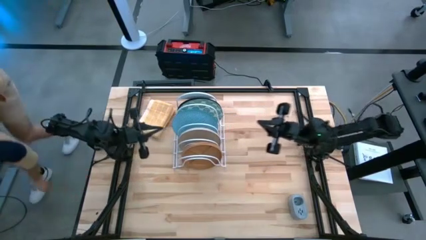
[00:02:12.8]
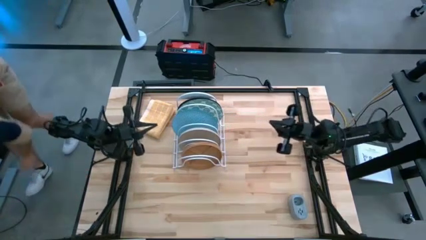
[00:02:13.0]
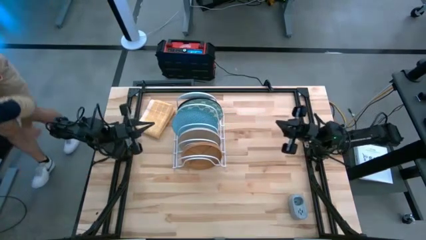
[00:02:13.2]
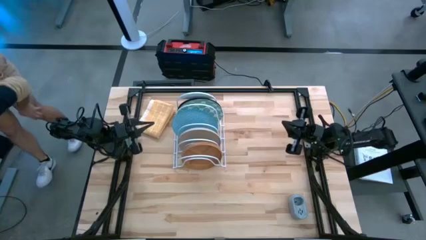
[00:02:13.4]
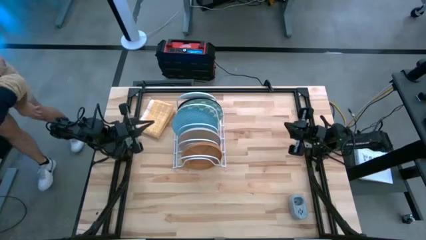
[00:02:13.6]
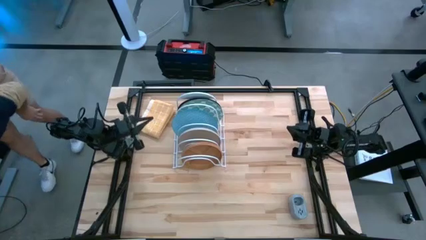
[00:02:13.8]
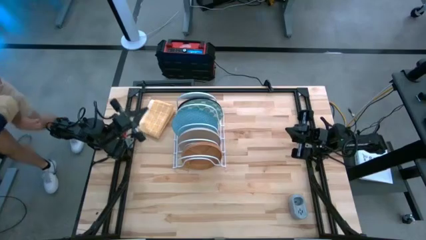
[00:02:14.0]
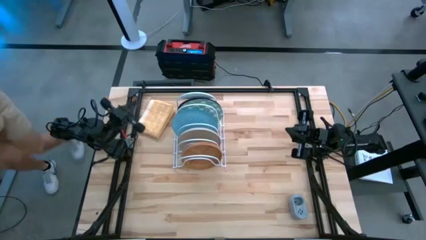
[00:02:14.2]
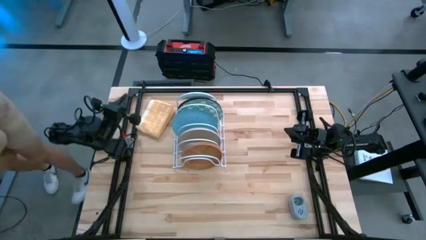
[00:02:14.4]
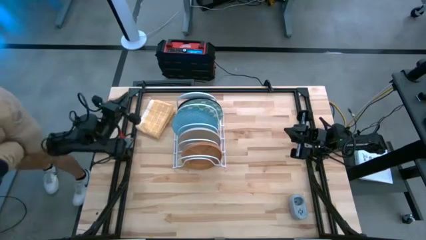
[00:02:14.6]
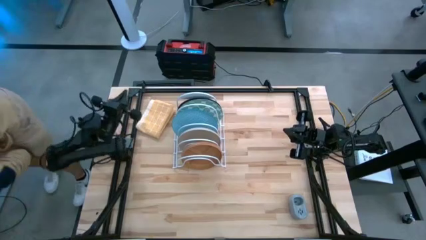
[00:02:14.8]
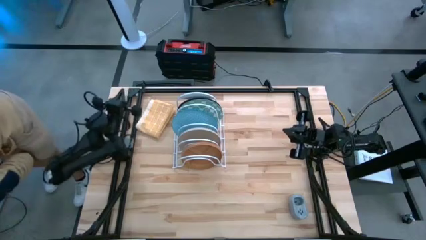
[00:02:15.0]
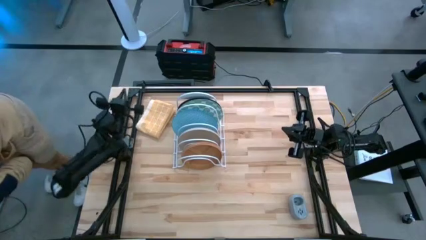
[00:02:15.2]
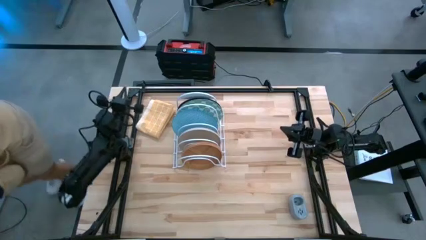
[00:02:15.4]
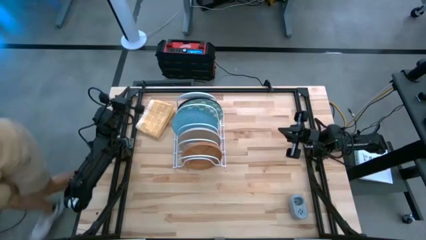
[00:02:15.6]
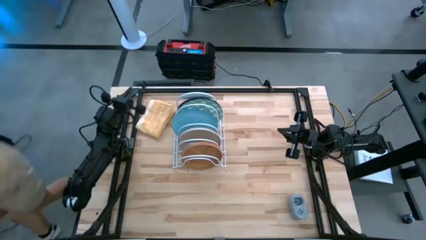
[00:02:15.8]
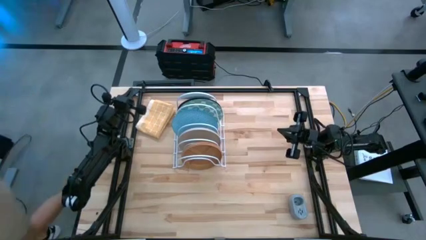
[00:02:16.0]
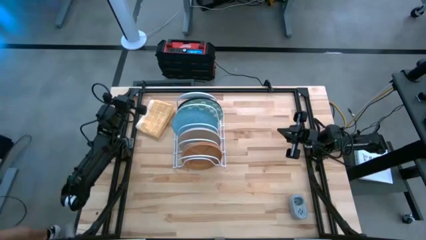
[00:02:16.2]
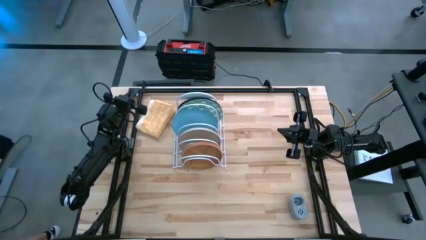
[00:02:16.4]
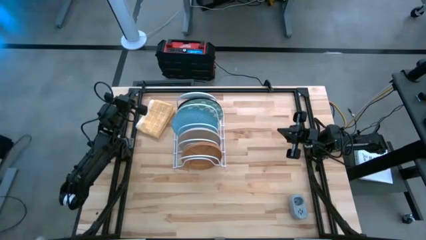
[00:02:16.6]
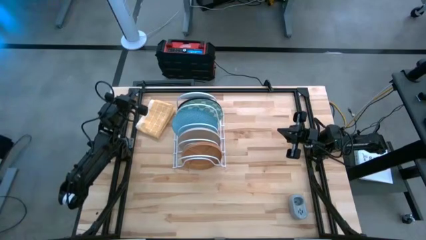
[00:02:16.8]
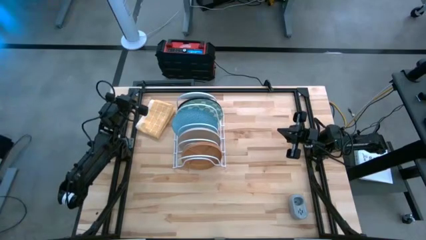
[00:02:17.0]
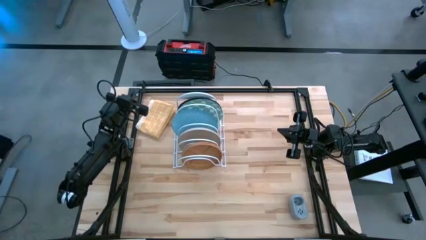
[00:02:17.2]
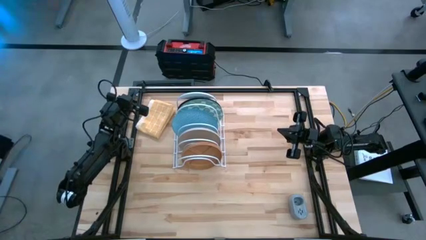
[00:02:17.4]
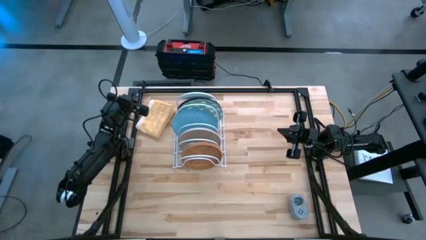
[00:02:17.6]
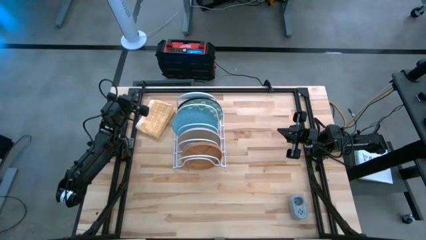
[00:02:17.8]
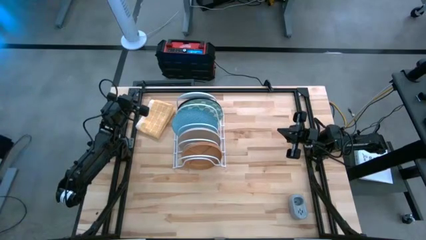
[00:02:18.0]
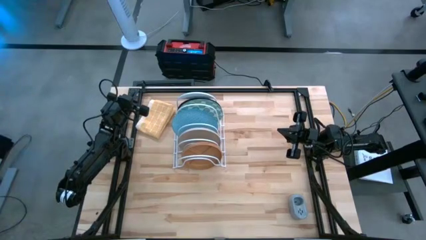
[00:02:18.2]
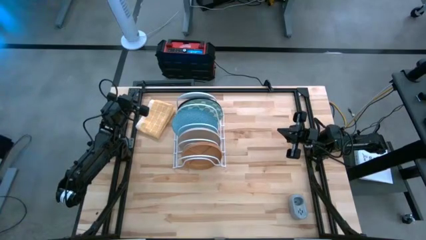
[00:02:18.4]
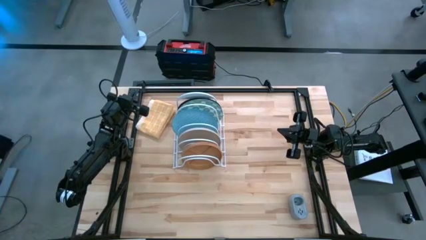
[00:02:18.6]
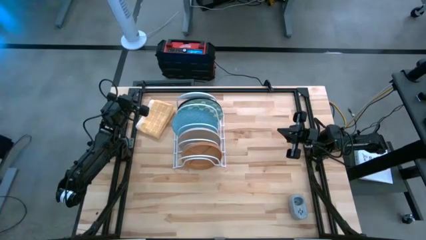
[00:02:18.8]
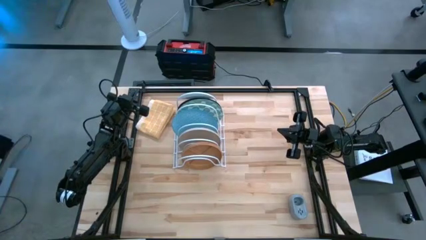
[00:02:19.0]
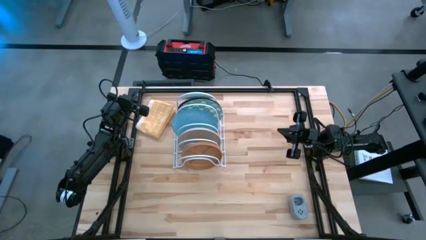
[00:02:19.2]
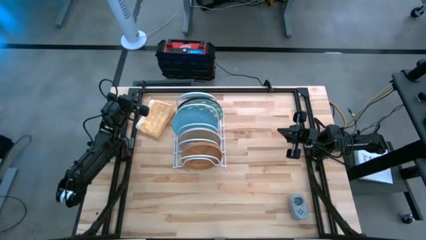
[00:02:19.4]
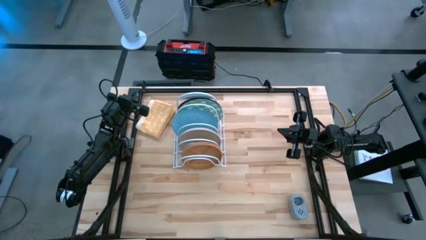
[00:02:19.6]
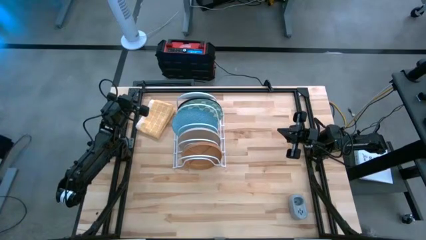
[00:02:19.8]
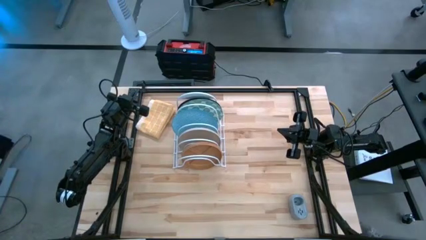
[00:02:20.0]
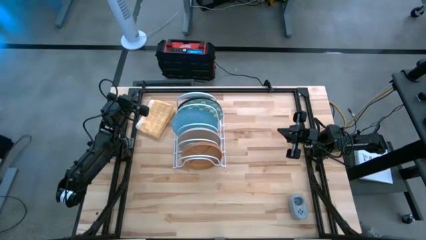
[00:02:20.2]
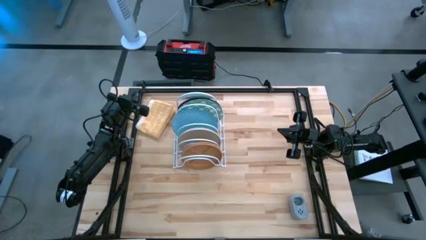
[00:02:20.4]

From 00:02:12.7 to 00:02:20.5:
Task: Sort dishes
Return to Home Position

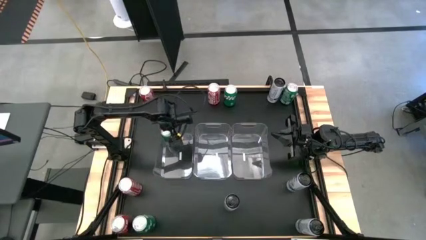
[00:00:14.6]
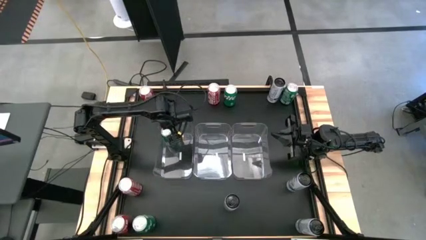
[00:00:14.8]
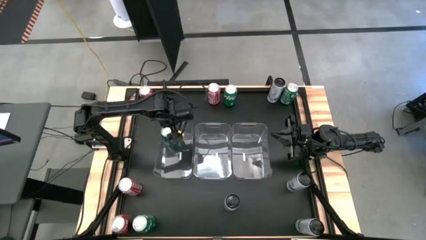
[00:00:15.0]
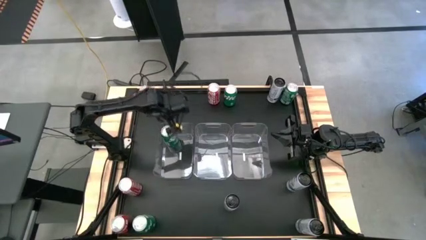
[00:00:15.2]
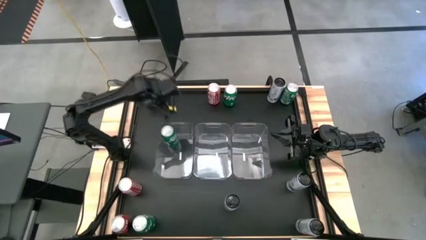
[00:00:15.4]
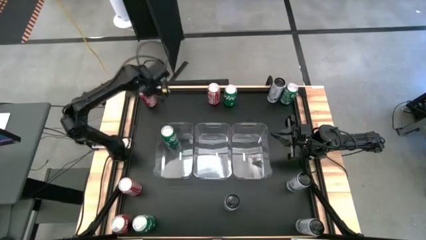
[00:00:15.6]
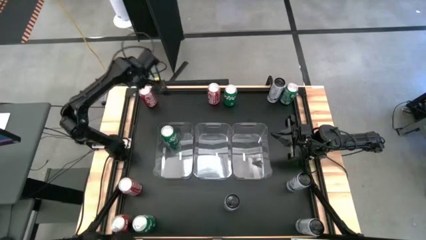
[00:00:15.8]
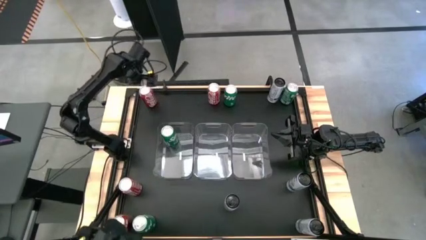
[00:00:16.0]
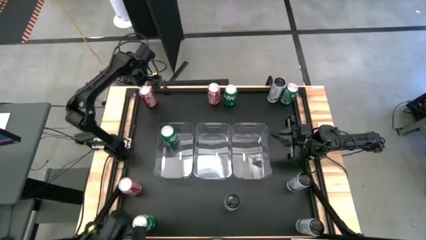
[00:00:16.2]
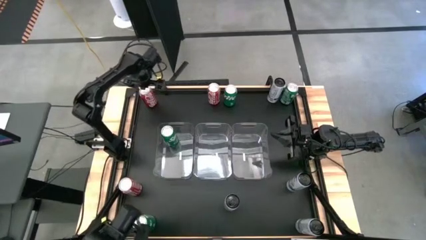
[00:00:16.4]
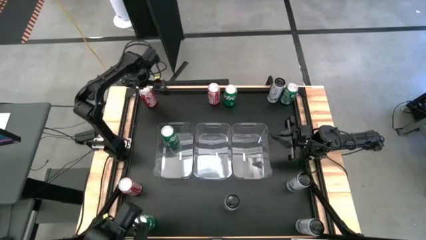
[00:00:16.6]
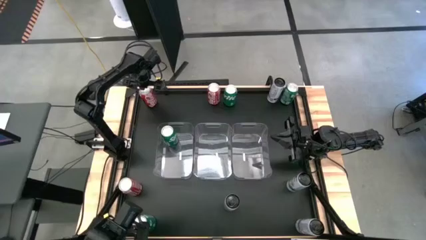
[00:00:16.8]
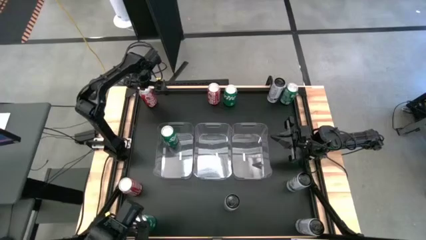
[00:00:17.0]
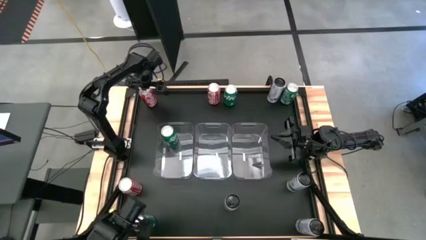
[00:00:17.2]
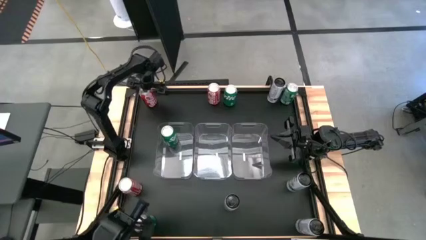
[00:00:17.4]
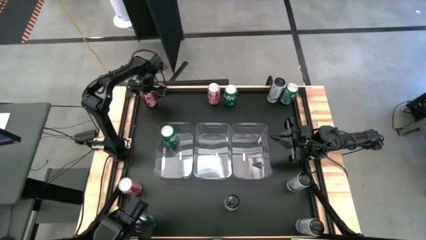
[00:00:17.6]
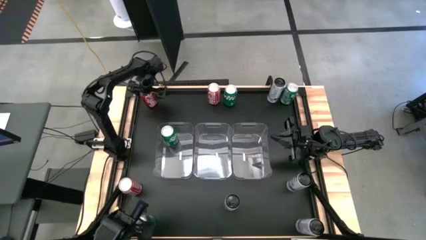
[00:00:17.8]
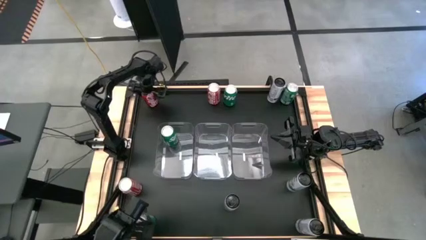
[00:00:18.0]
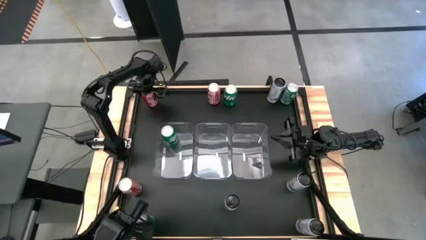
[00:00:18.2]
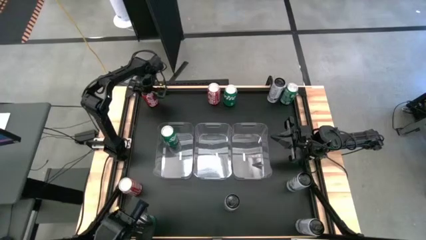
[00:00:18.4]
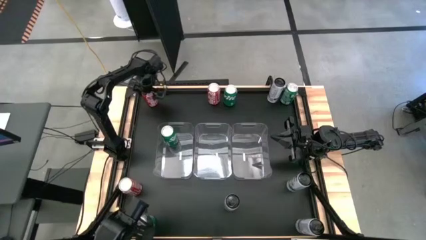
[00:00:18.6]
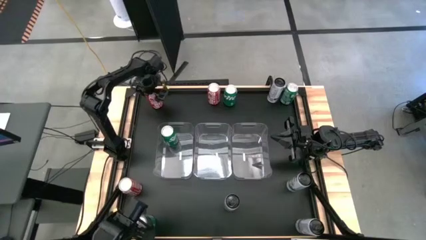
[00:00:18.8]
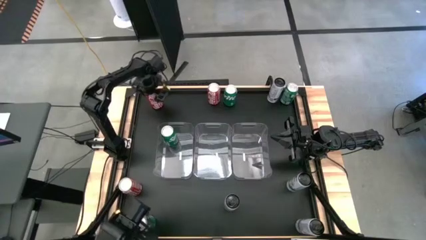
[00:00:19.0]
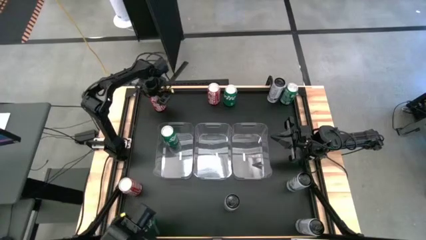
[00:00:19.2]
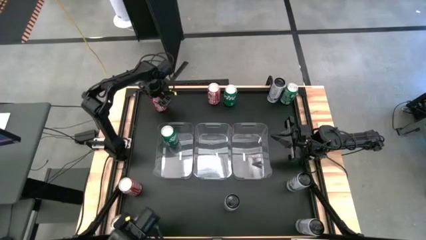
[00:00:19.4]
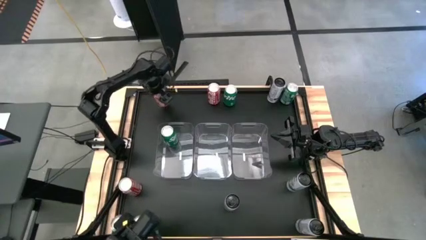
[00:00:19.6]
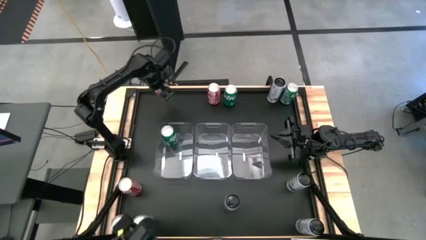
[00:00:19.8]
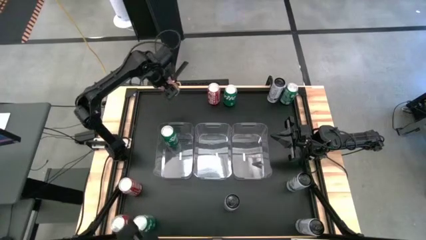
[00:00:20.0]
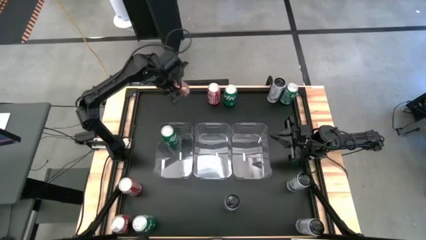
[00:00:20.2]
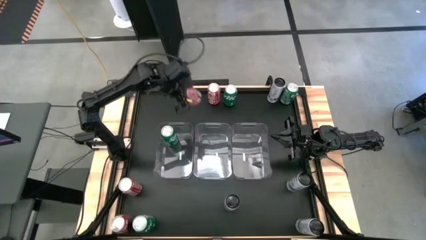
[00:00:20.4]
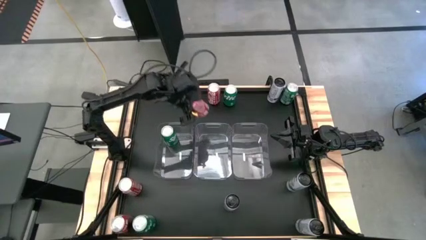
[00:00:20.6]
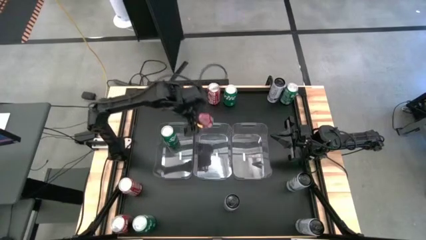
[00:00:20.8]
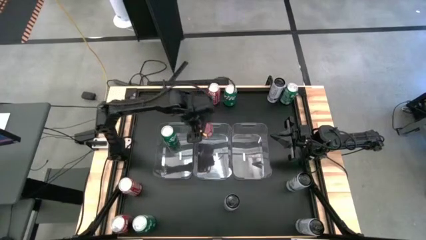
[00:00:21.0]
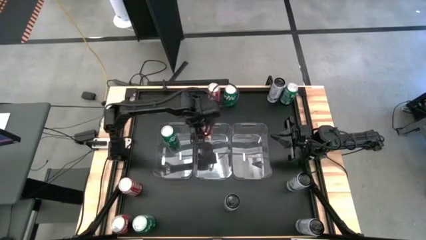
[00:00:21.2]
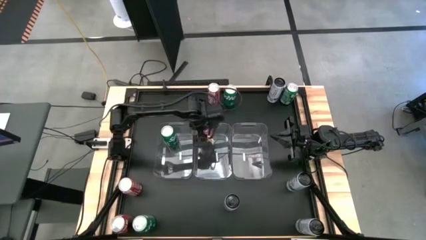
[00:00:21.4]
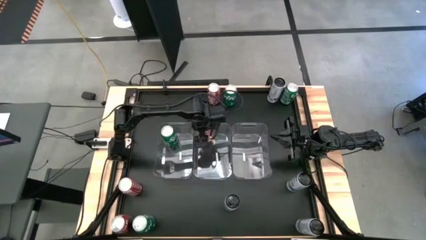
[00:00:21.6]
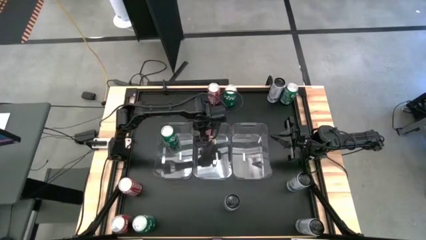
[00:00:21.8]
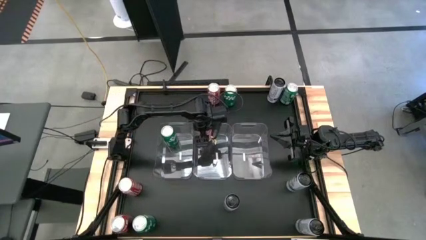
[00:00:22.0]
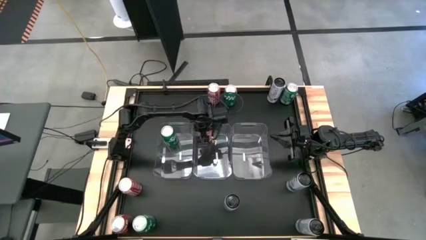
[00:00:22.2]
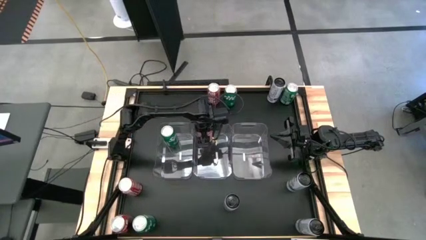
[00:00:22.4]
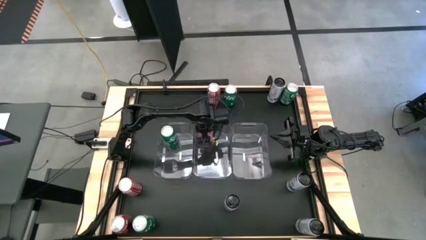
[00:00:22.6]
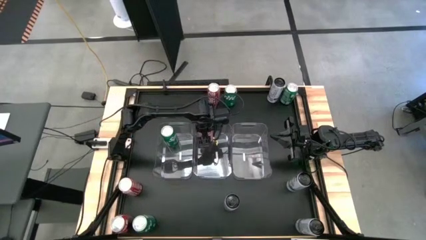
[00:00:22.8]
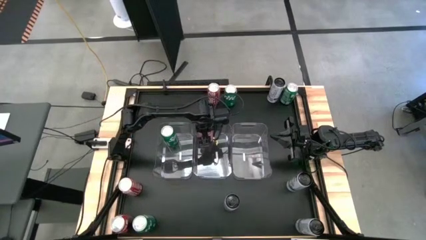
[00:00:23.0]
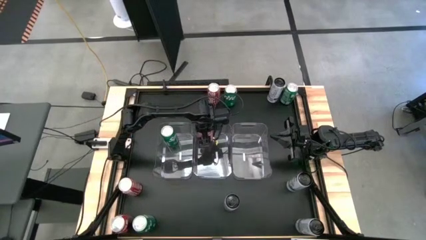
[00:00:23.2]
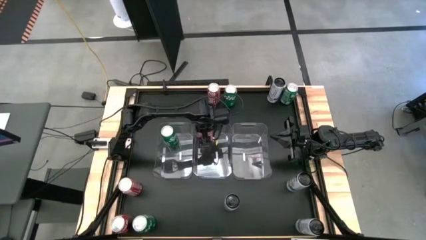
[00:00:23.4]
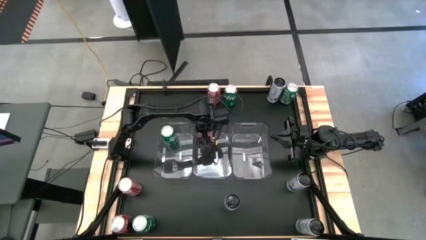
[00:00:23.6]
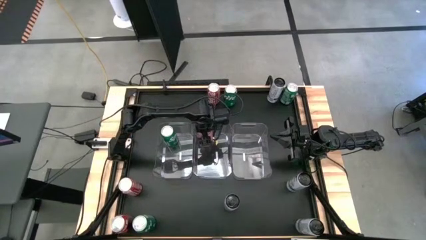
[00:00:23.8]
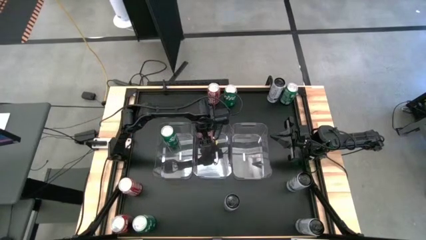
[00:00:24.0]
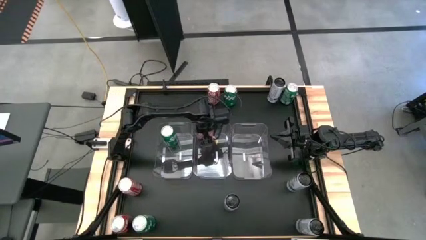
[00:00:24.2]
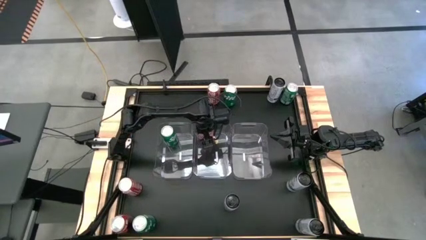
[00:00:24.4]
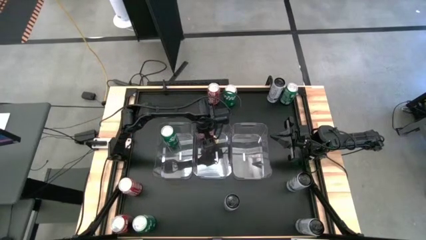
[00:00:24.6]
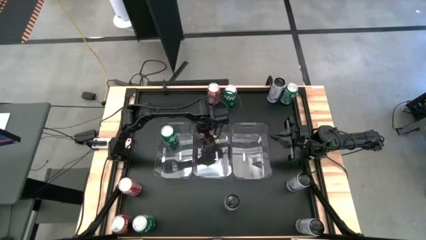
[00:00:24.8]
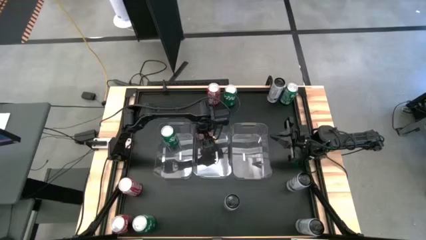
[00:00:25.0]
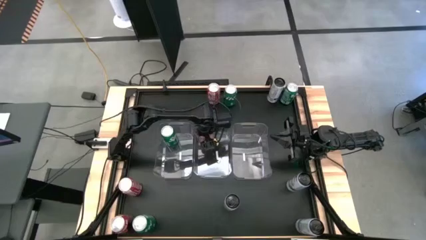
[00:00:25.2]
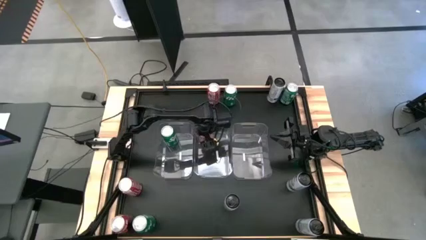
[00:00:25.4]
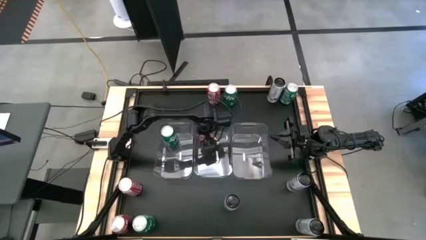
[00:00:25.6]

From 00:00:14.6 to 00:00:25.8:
Task: Sort soda cans
Put the top left red soda can into the middle transparent bin
